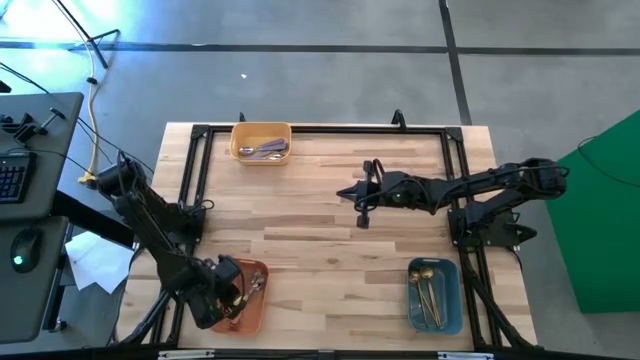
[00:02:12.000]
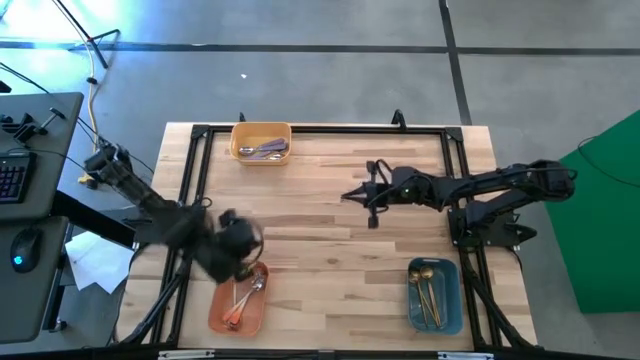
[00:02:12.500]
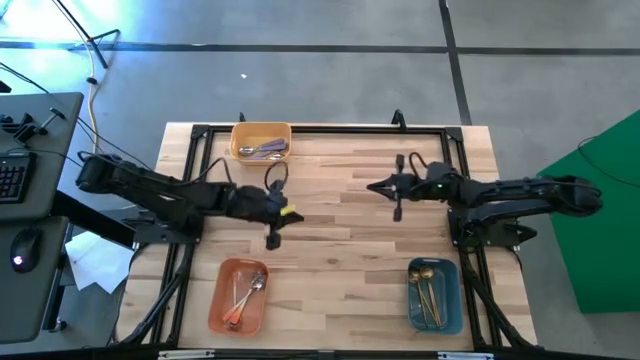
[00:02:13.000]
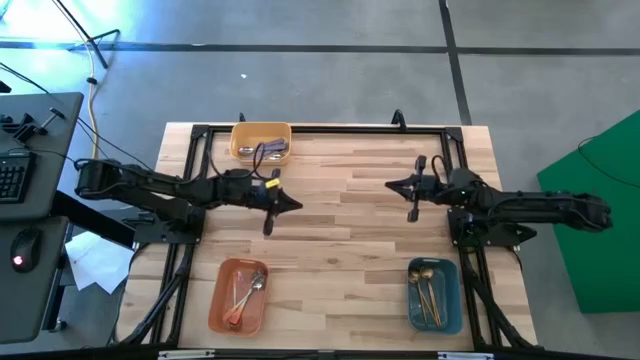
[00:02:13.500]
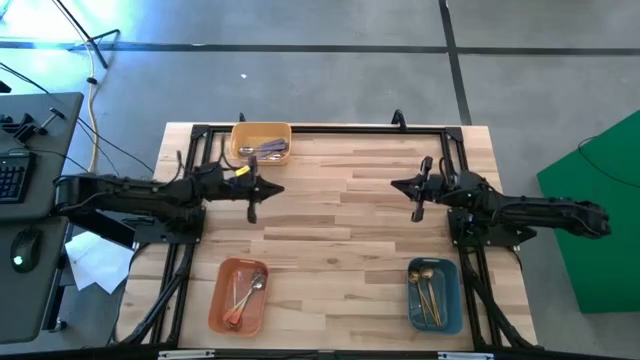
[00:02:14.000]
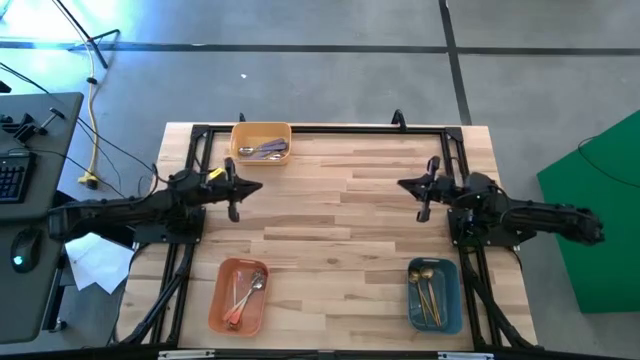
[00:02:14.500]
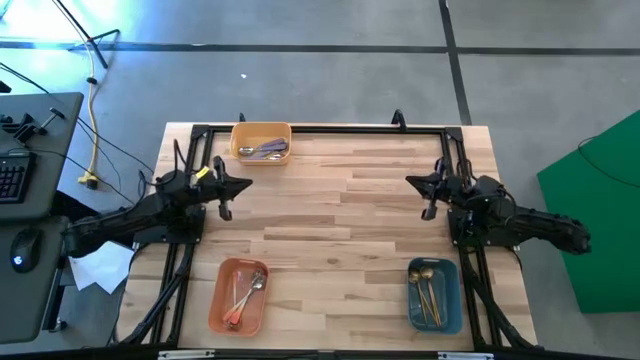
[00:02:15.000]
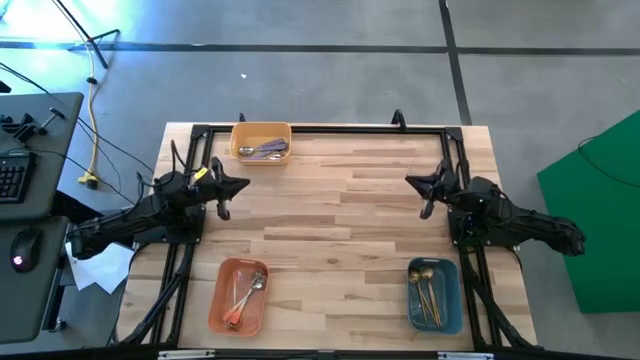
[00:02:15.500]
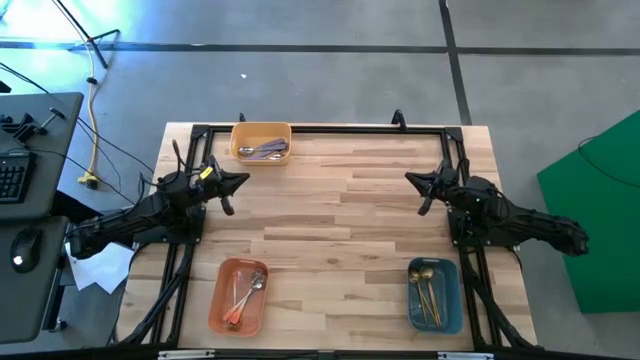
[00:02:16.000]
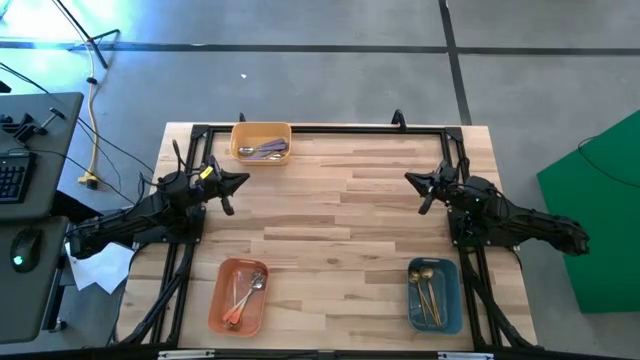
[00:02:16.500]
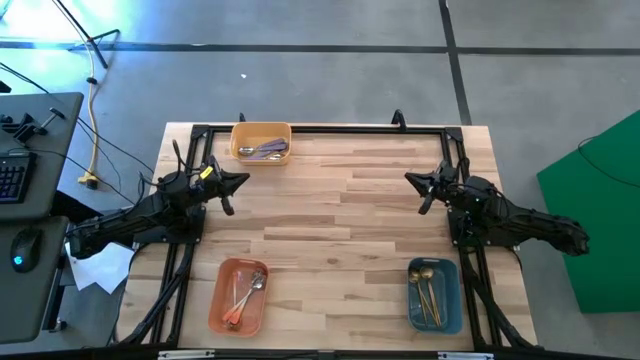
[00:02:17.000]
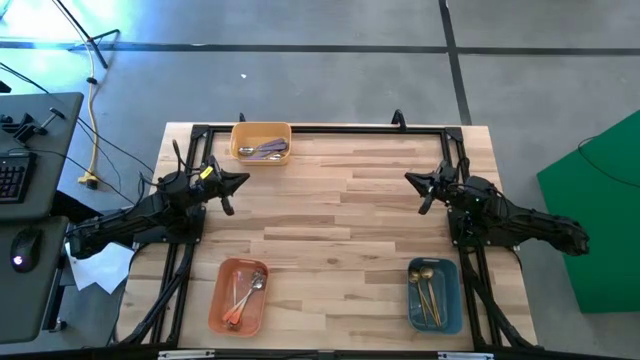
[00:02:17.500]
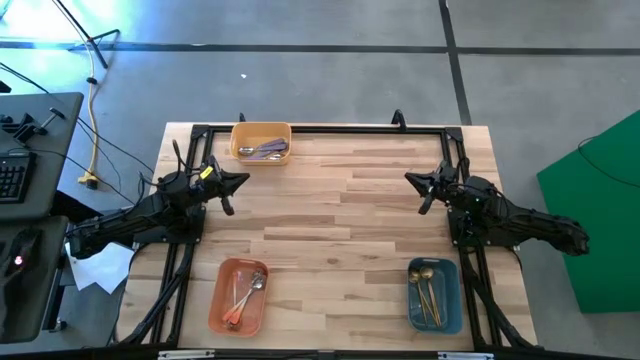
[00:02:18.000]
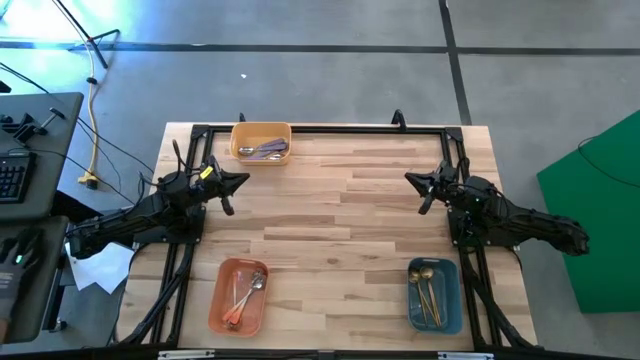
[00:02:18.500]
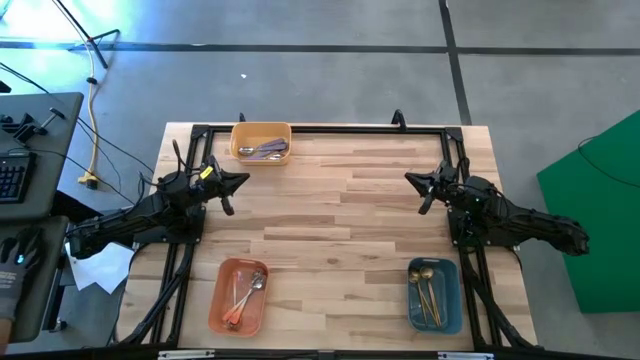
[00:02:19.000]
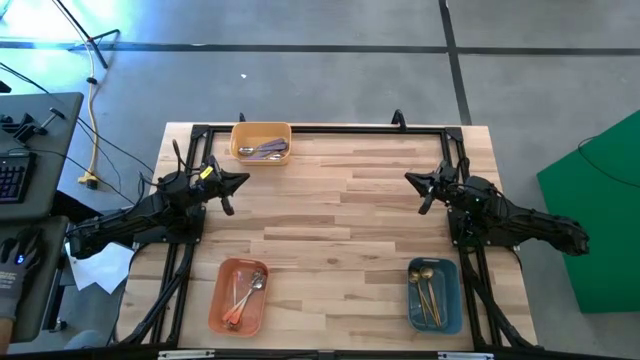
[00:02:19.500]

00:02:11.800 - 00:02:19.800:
Task: Sort silverware by color (type)
Return to Home Position

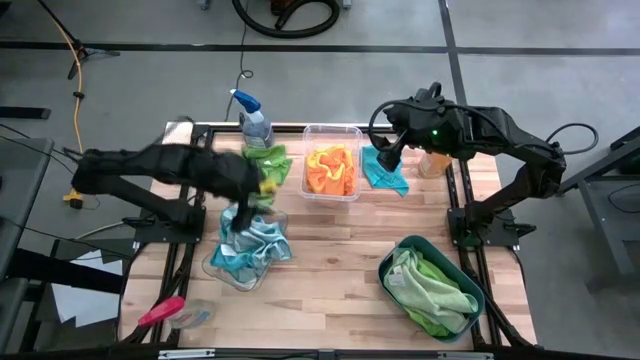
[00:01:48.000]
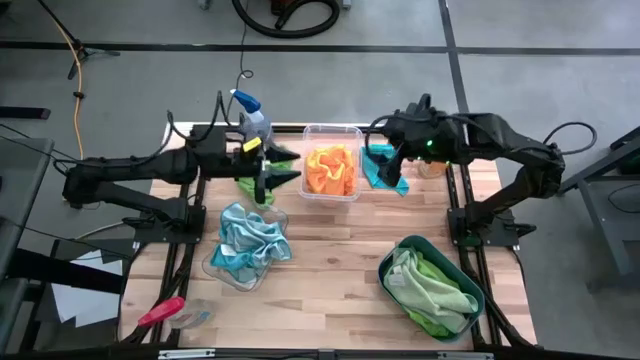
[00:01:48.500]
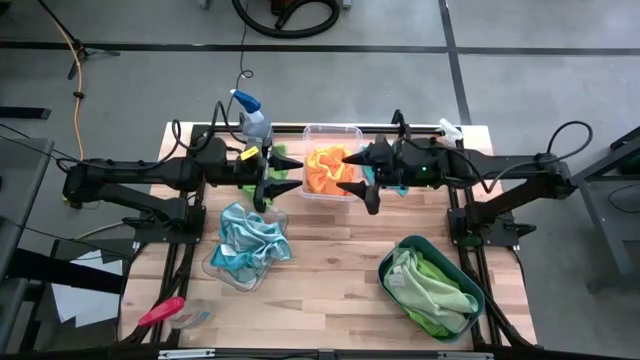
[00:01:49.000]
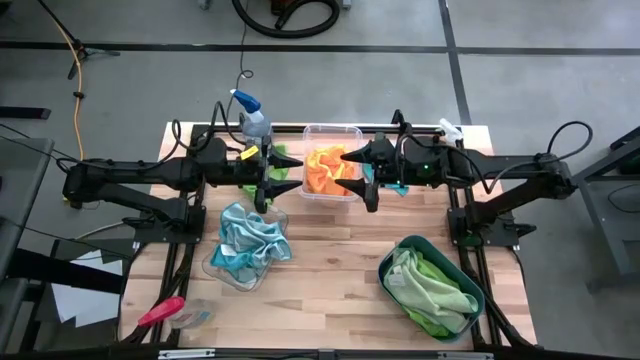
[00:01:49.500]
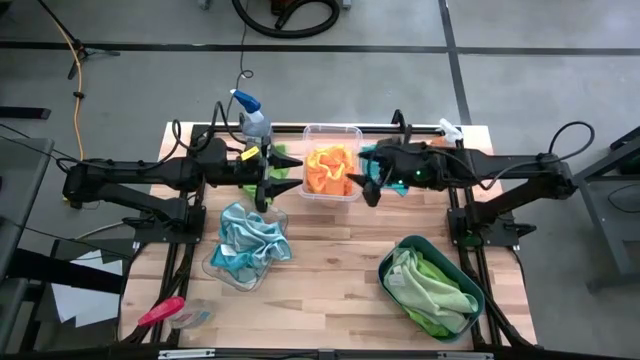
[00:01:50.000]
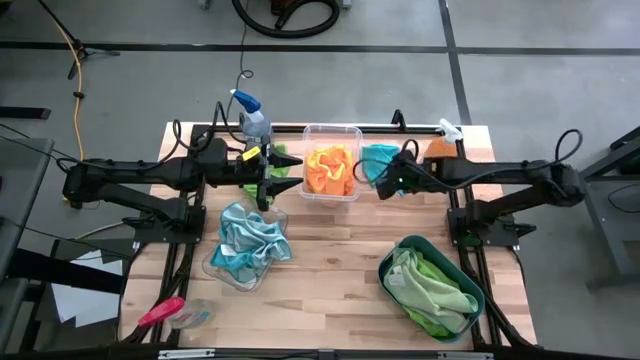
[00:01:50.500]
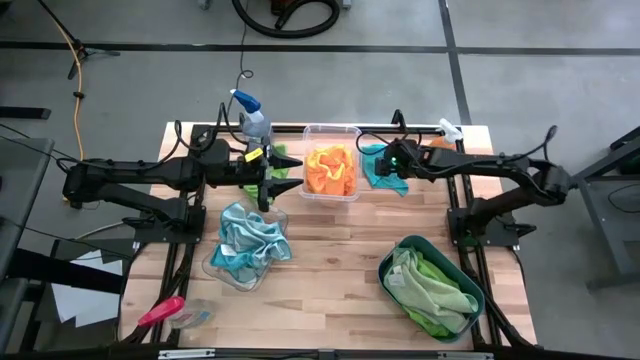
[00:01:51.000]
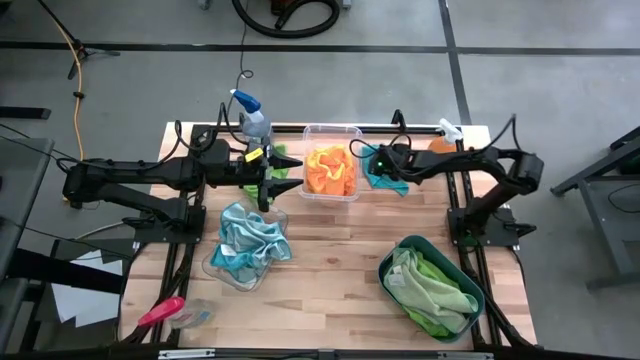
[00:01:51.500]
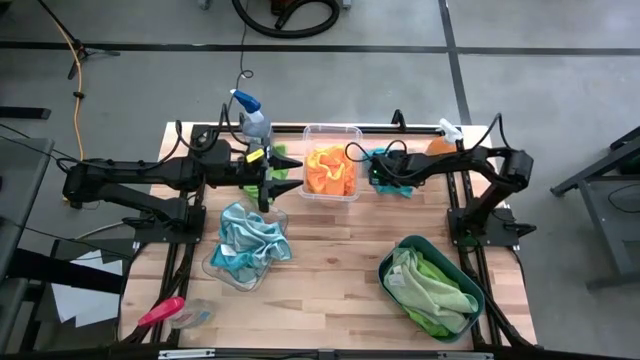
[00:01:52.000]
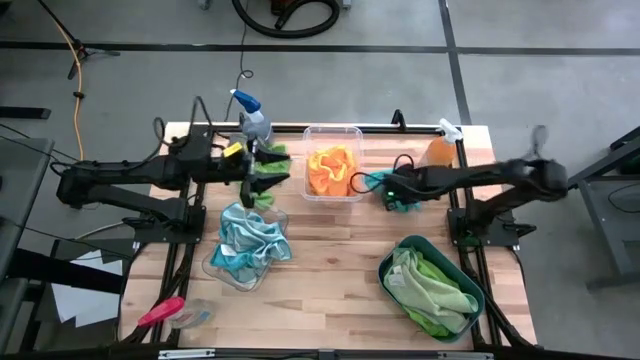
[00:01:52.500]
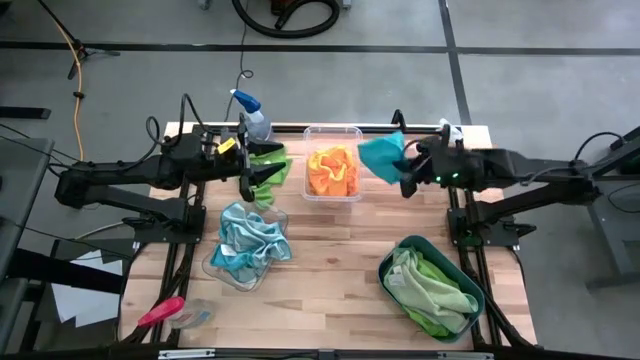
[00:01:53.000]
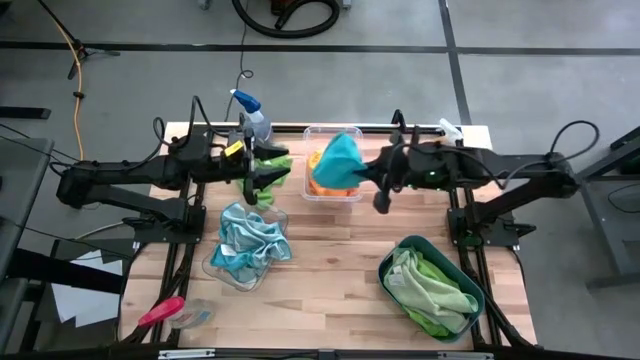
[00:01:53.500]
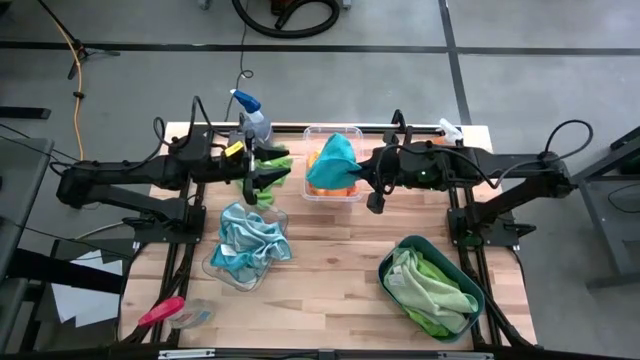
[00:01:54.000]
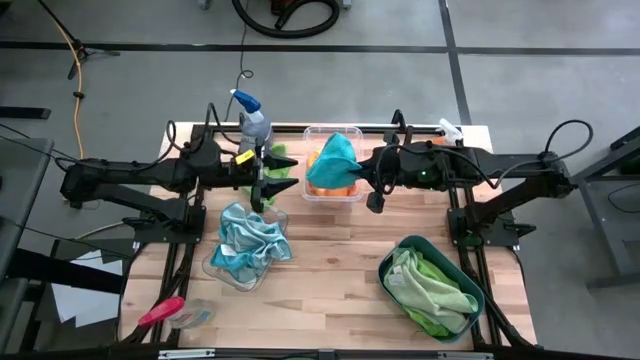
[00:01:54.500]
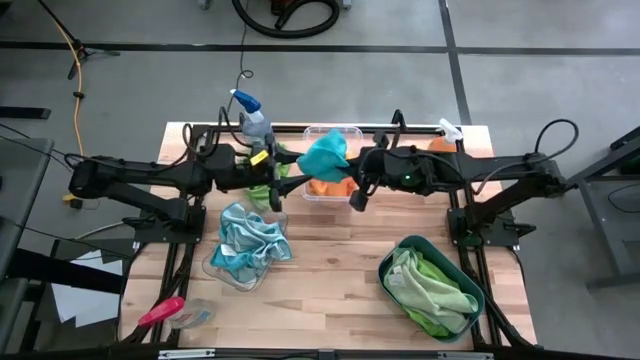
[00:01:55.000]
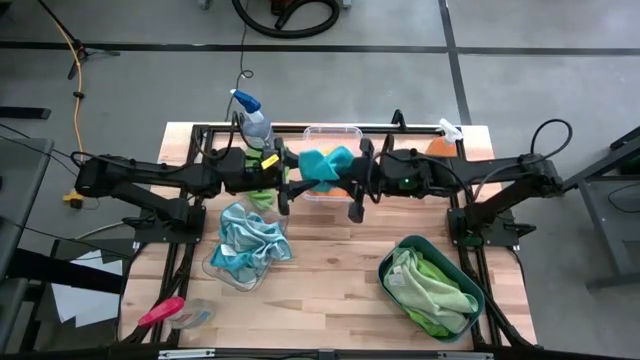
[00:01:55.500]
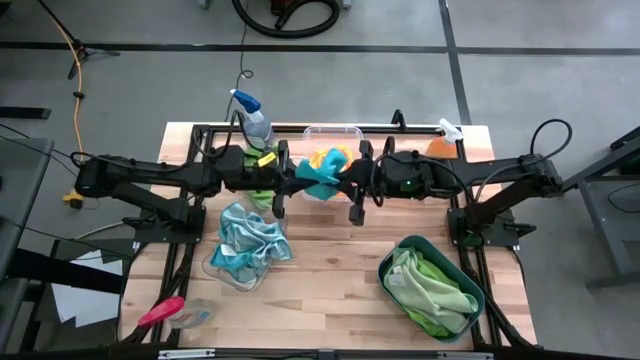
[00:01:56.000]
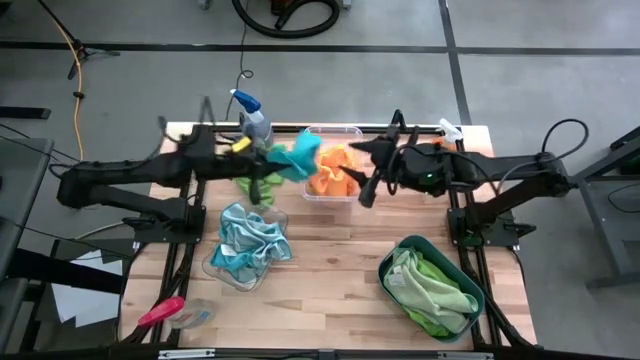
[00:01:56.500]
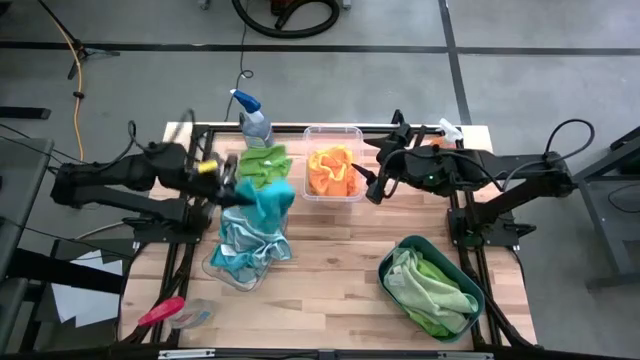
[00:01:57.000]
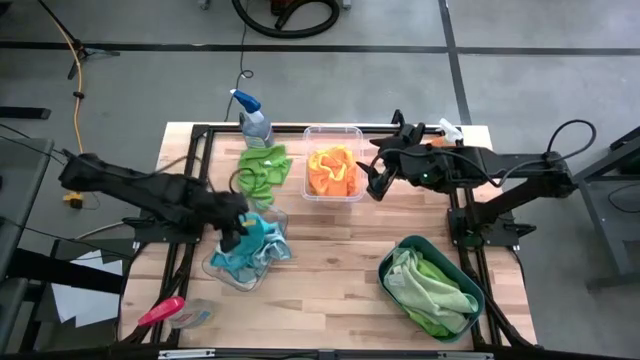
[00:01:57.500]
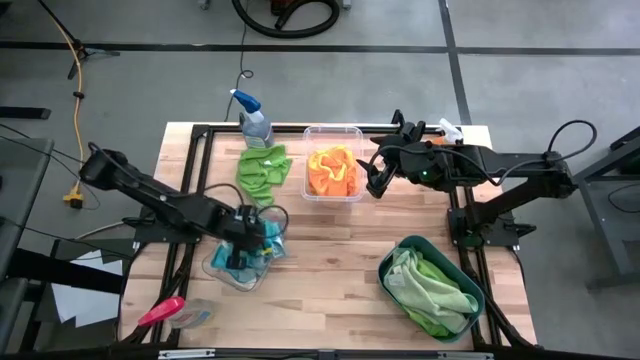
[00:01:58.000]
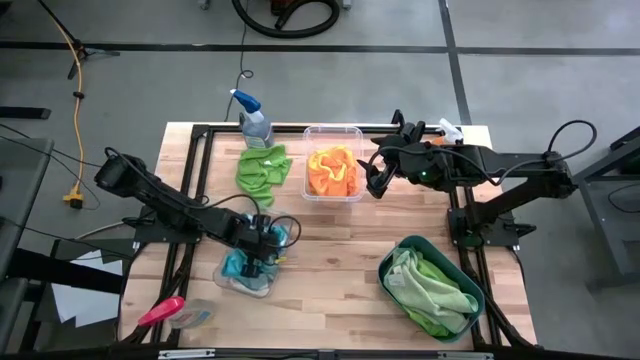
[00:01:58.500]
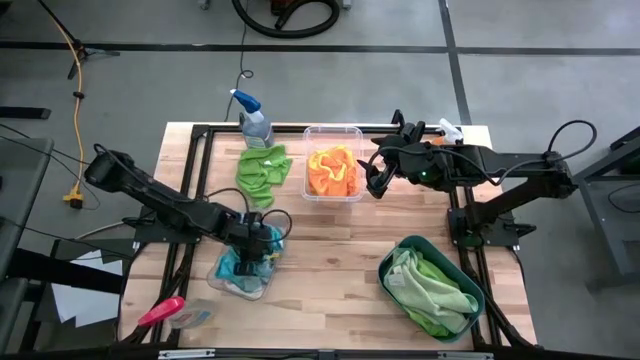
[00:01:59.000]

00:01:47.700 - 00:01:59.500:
Task: Sort microfiber towel by color & place in baskets
Put the blue microfiber towel into the bottom transparent bin
